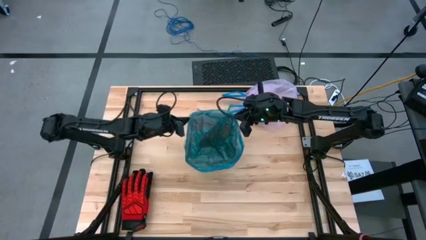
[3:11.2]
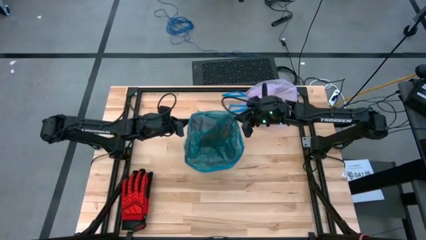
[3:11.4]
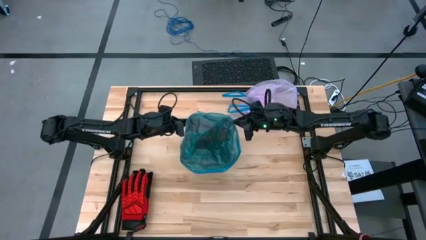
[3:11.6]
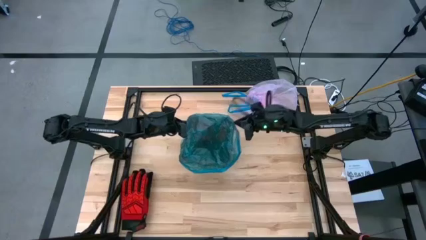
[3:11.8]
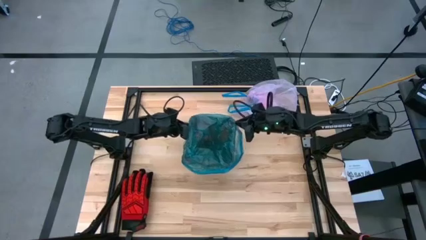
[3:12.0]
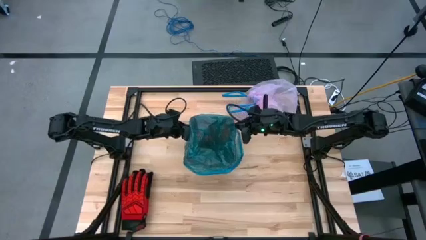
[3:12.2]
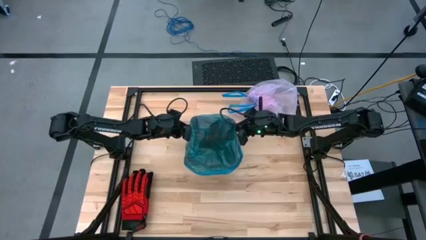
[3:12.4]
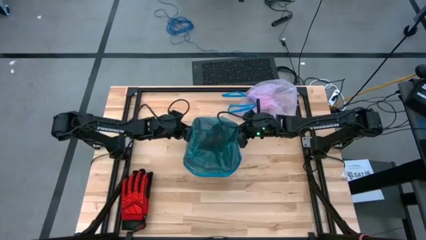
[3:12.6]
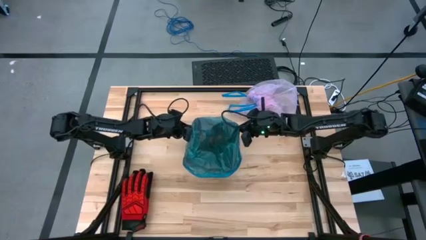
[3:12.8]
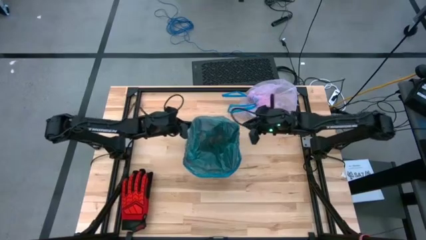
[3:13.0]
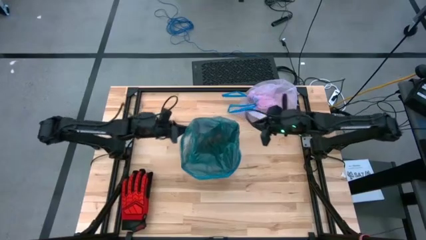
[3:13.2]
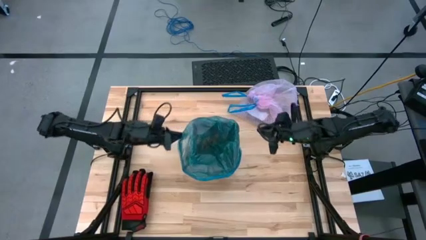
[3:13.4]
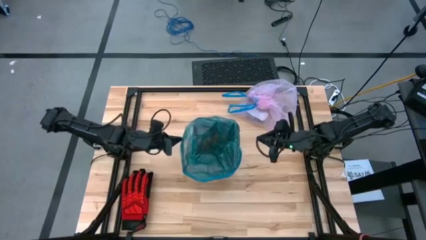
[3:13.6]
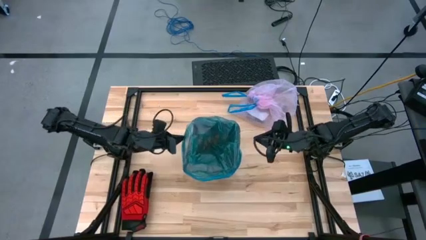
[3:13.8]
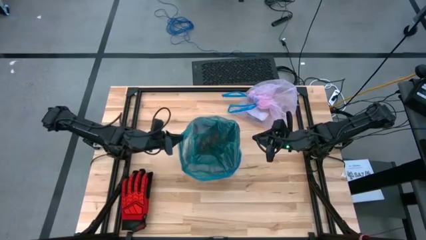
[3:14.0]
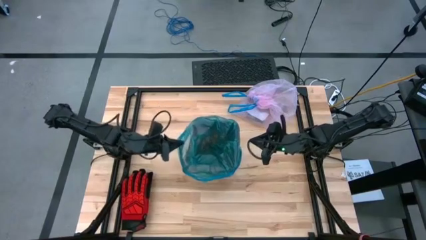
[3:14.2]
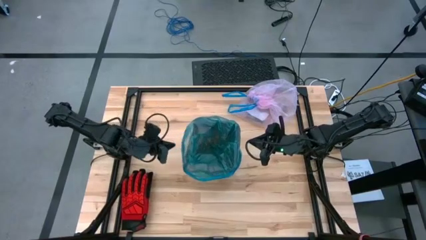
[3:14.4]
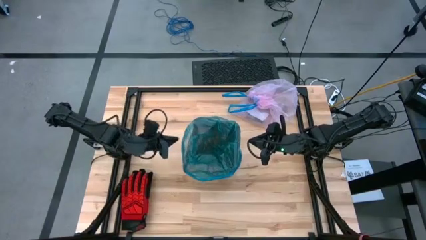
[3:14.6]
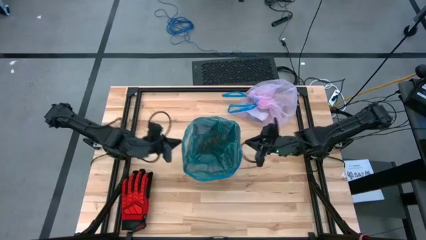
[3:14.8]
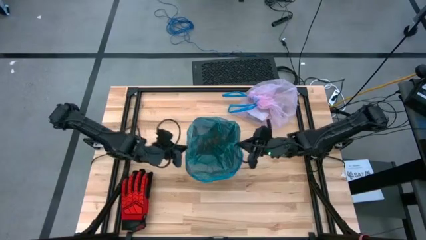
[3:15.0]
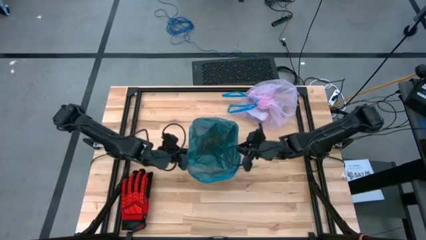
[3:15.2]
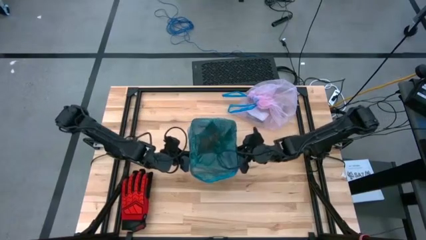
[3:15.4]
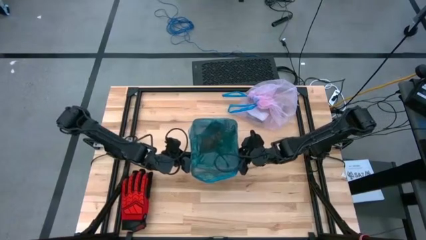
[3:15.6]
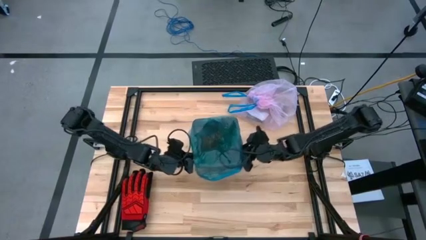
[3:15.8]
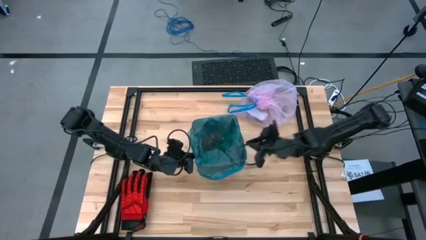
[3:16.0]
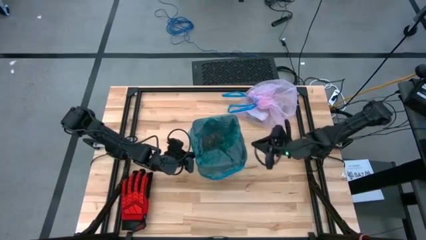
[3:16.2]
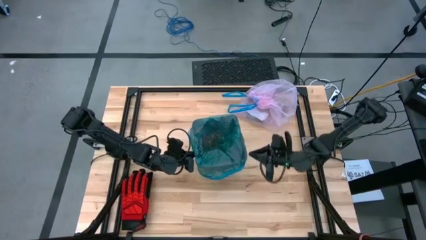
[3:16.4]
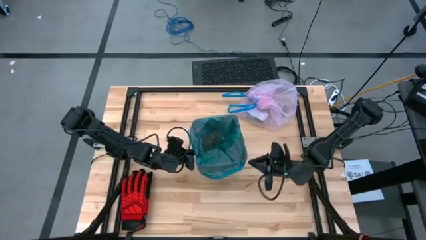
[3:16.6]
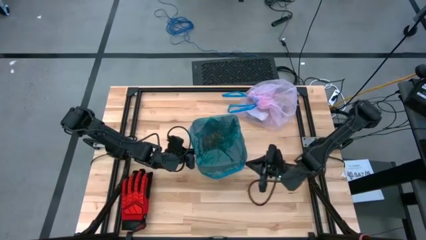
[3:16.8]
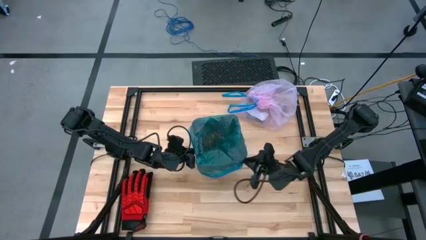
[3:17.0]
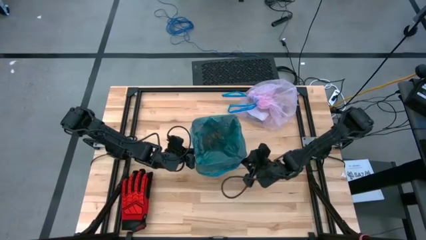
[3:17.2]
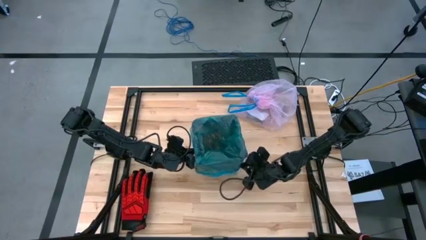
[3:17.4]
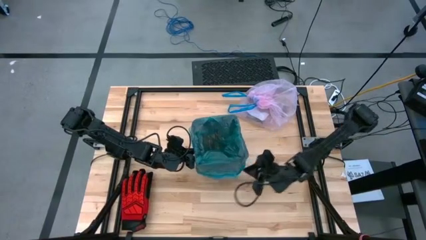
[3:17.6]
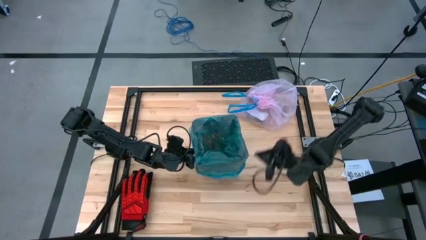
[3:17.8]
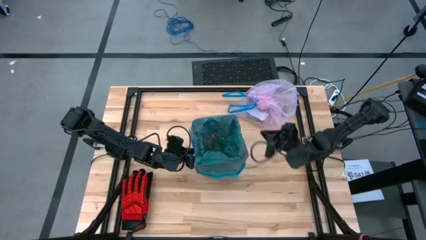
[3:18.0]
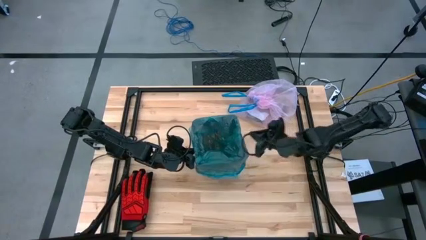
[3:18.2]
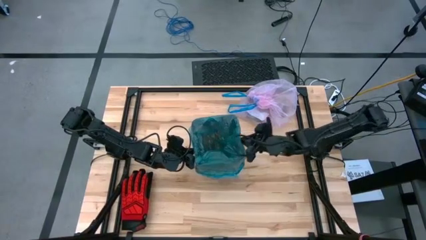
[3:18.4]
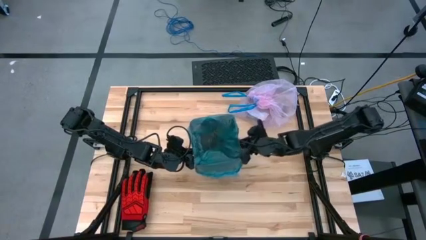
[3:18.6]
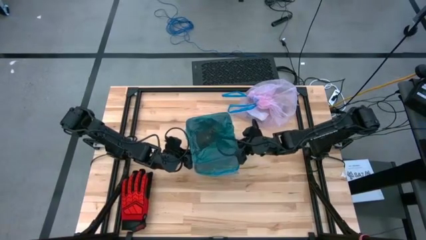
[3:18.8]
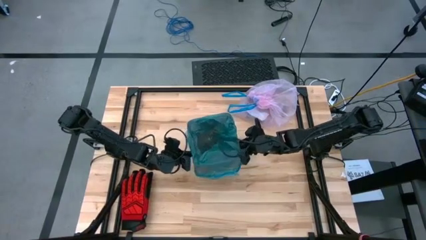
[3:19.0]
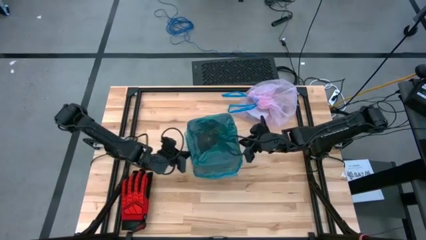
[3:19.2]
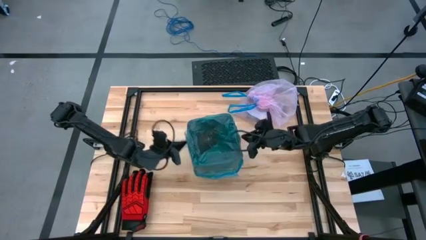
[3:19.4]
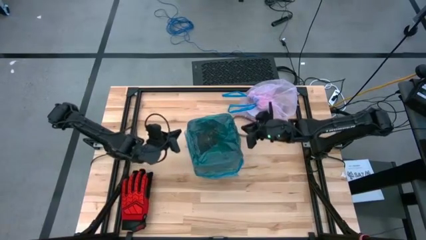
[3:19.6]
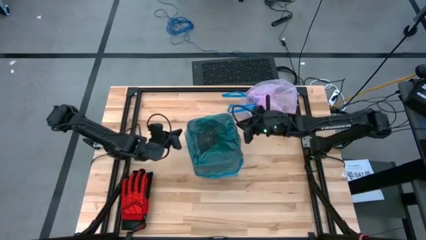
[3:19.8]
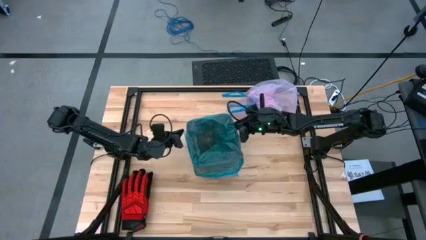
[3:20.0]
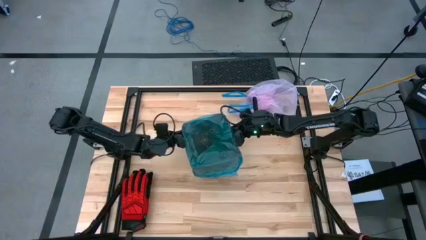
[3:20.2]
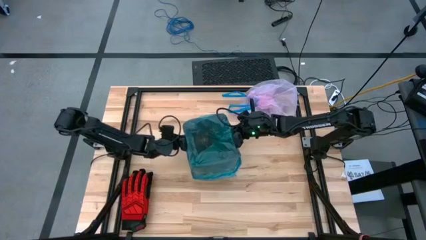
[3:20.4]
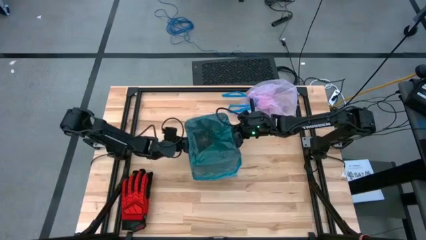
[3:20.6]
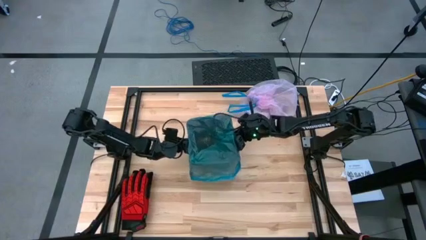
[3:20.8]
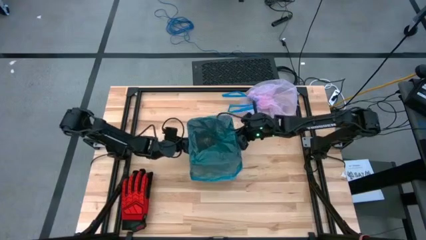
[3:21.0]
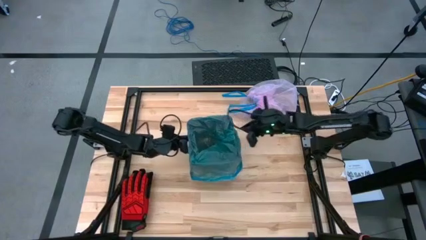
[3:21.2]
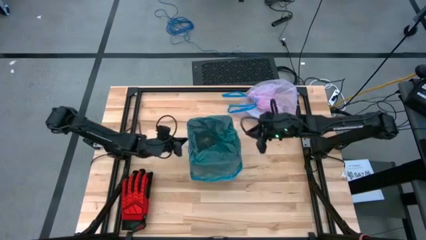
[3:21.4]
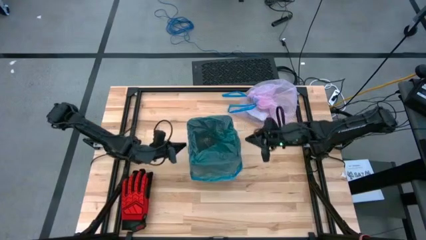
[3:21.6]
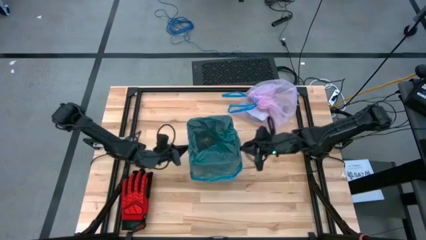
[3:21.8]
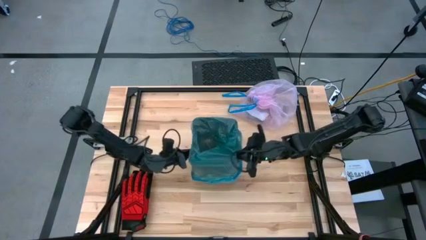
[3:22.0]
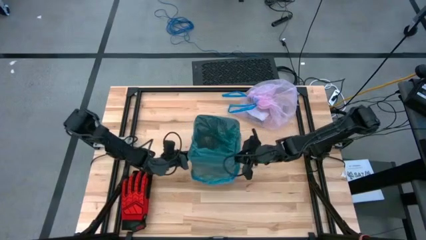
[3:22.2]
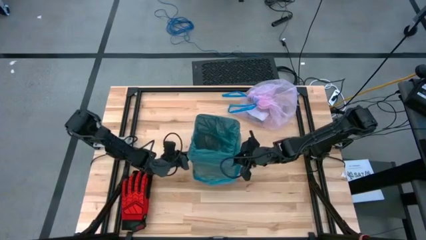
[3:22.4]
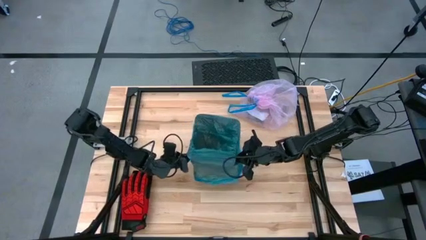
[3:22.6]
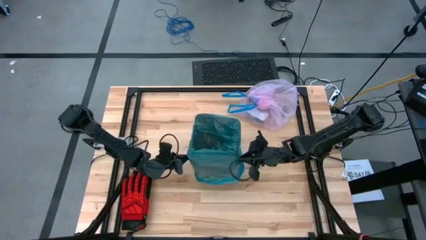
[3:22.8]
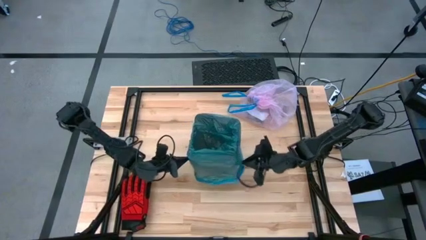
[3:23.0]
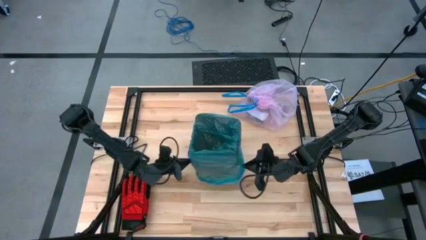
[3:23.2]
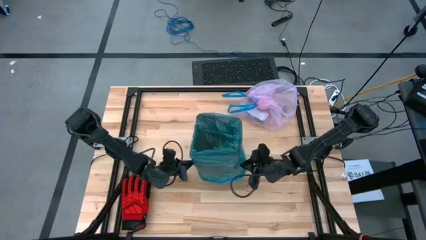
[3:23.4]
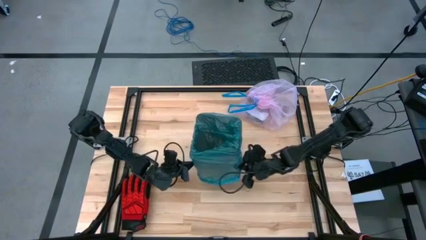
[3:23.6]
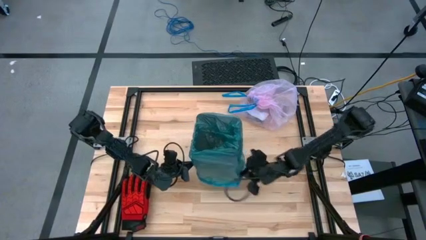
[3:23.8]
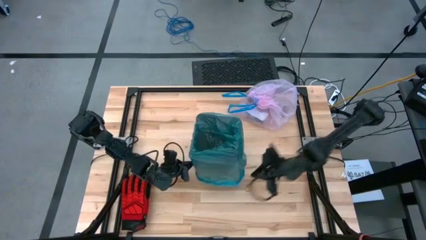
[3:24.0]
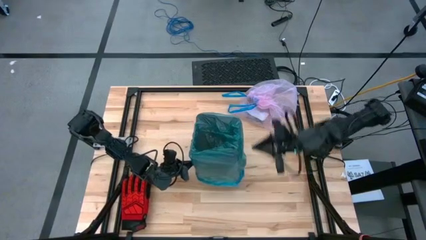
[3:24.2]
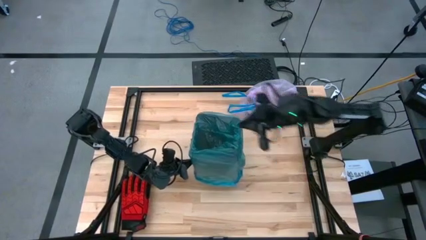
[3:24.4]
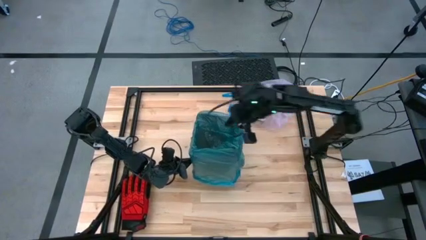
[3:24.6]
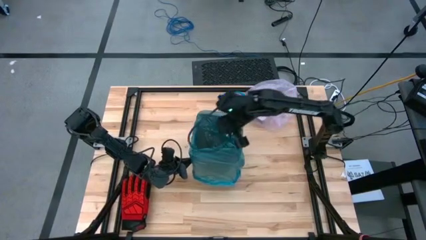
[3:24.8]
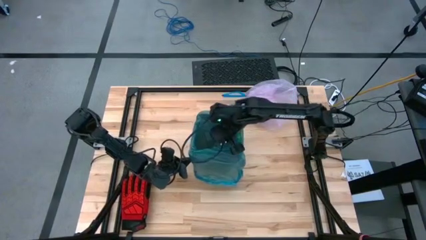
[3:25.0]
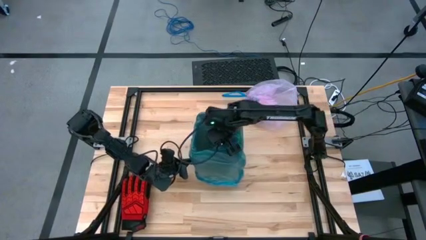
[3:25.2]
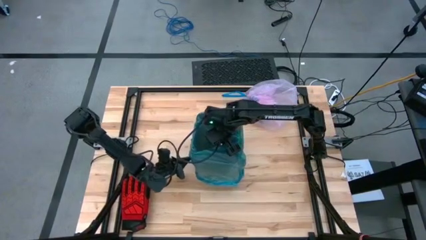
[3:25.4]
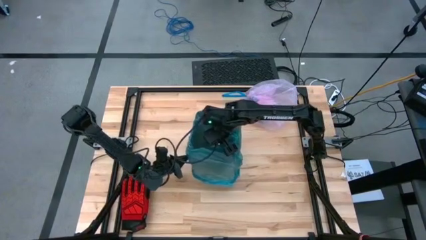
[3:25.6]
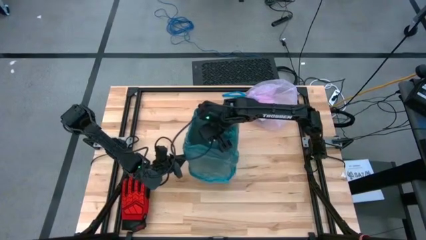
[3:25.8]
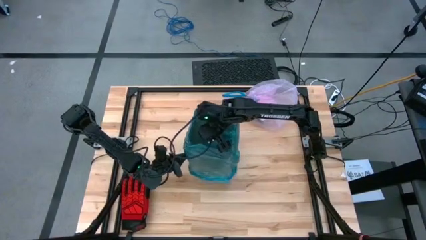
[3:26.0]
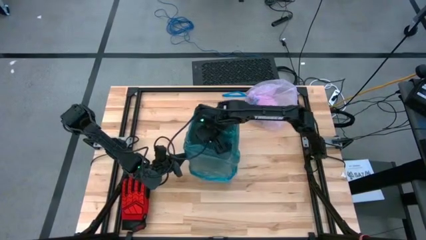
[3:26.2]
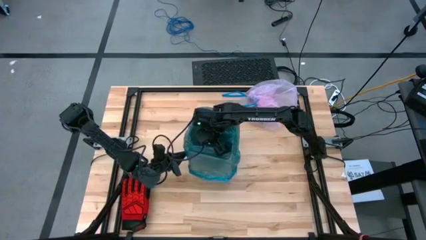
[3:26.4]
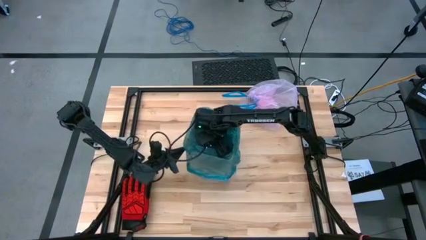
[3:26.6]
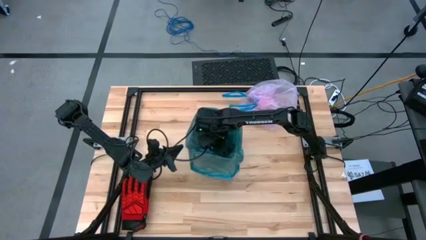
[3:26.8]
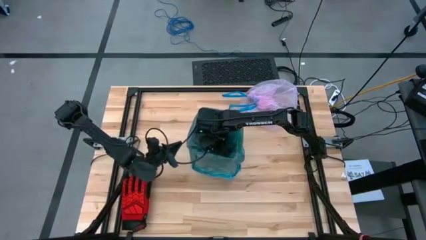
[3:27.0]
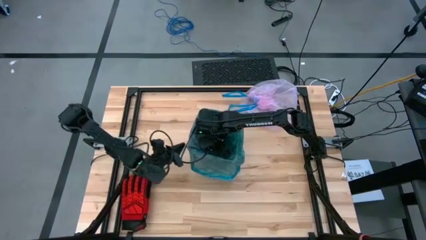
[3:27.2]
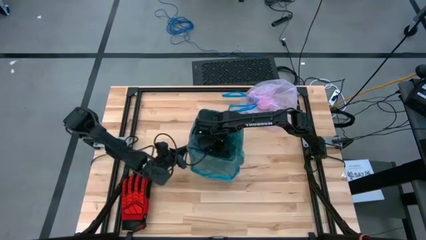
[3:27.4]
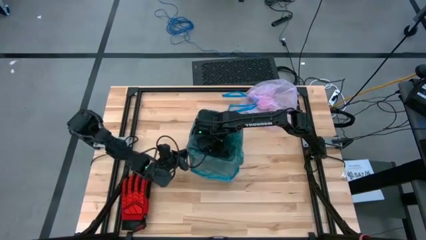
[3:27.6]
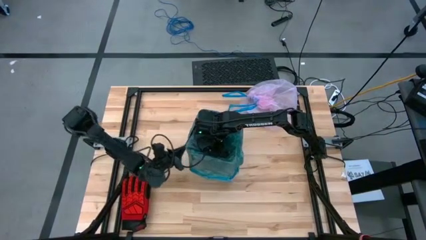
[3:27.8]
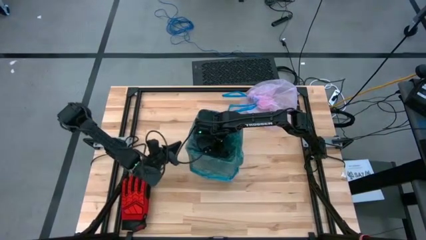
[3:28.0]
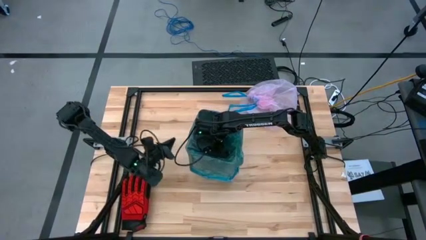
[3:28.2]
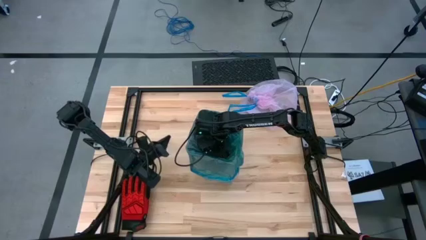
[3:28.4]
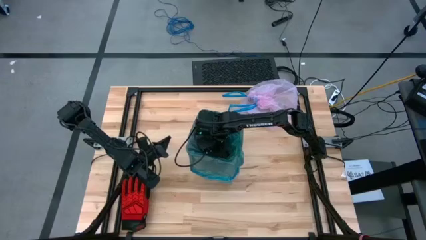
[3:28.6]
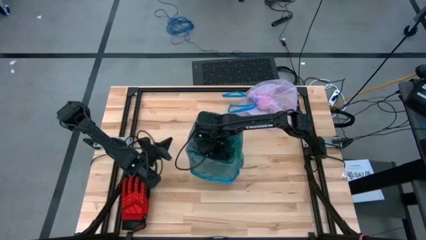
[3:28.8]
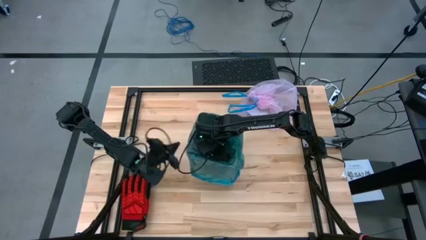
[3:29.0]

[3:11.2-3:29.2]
Task: place trash/remove bag and relplace
Insert the blue trash bag into the trash bin
